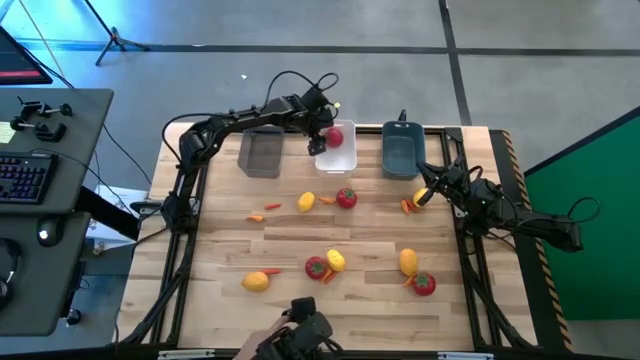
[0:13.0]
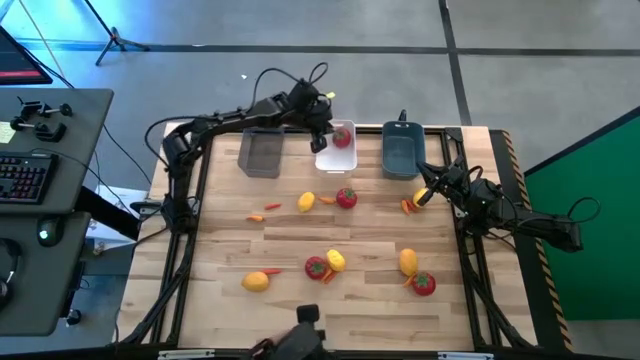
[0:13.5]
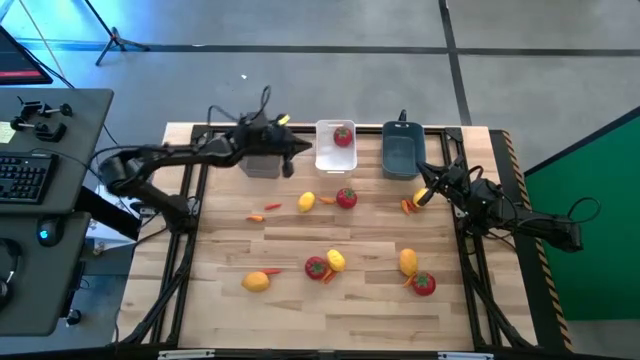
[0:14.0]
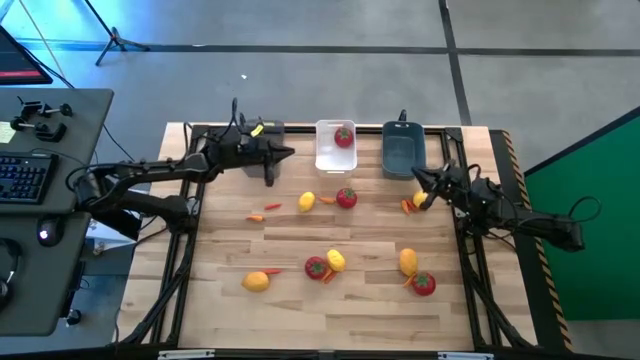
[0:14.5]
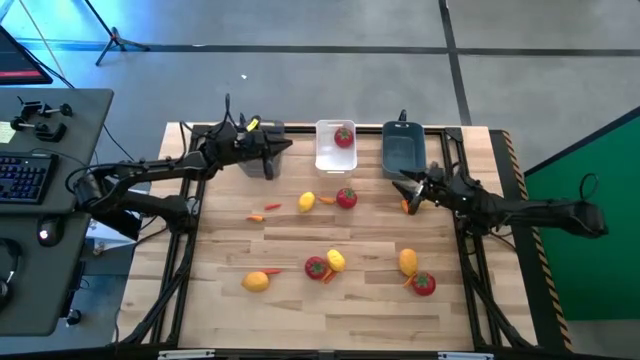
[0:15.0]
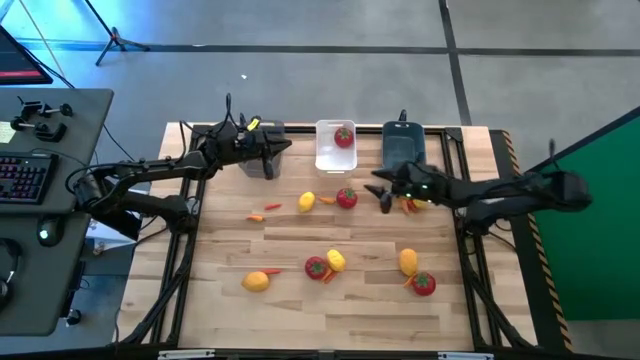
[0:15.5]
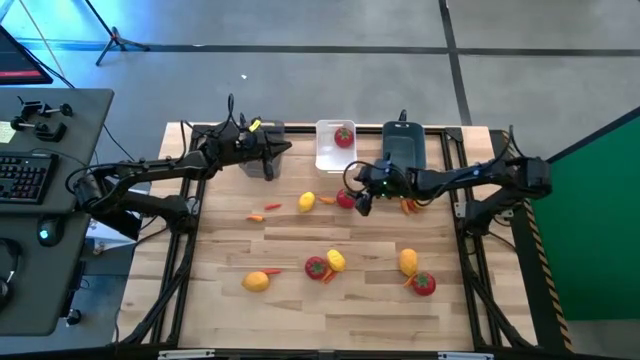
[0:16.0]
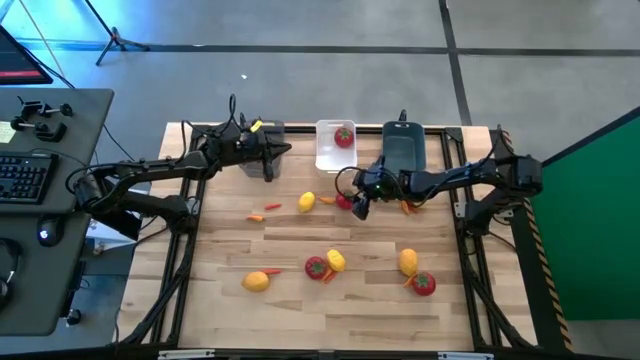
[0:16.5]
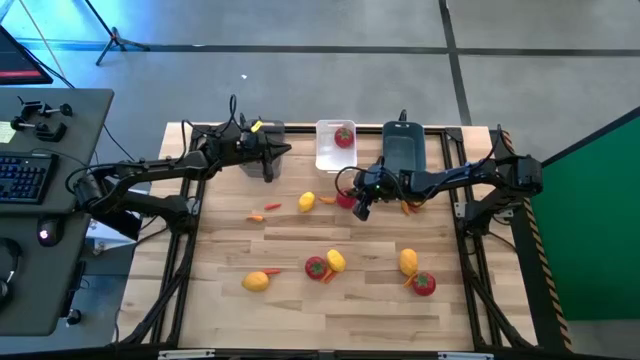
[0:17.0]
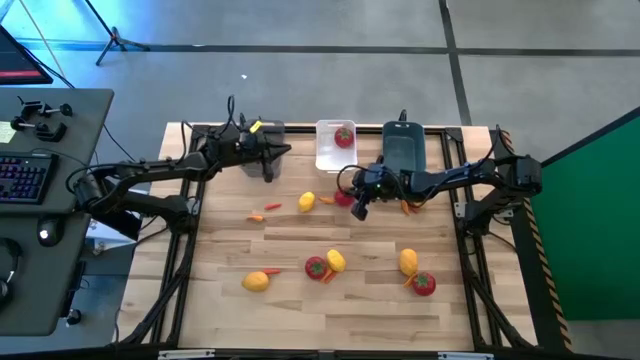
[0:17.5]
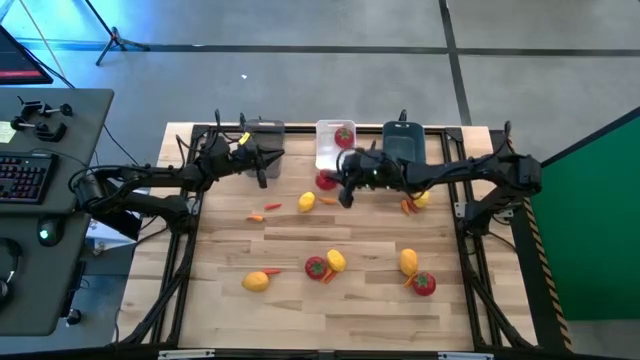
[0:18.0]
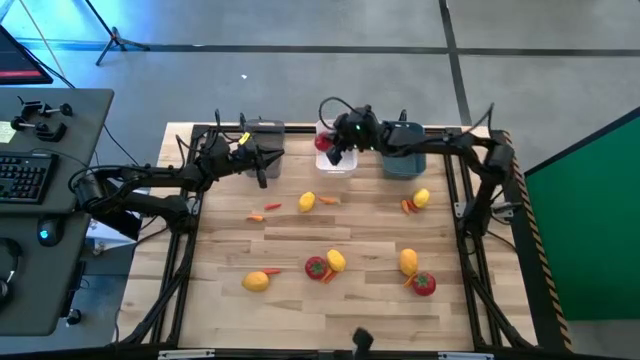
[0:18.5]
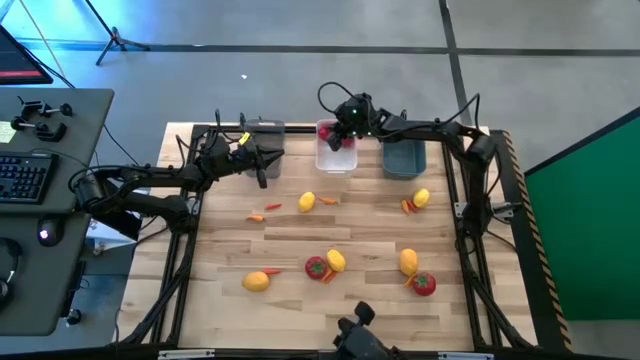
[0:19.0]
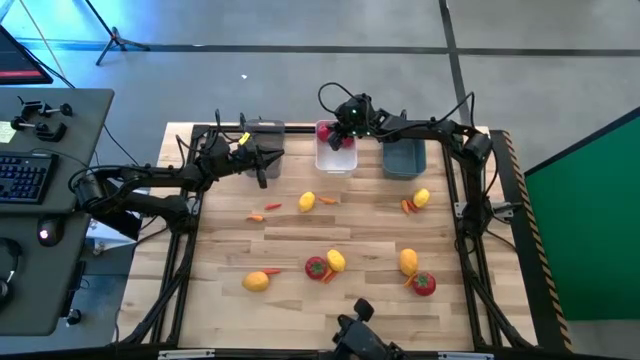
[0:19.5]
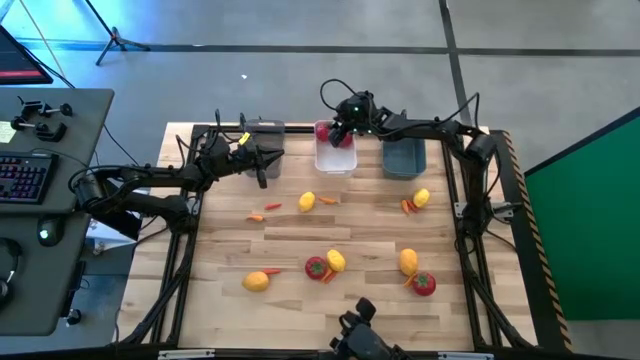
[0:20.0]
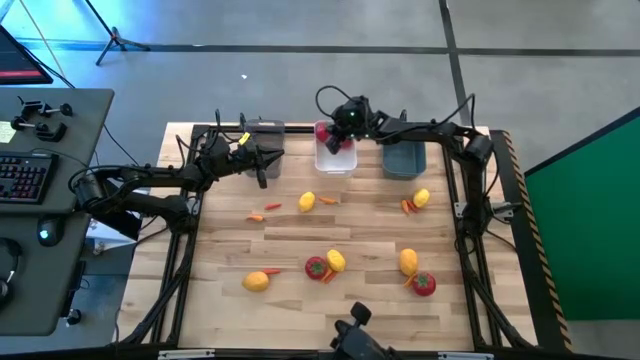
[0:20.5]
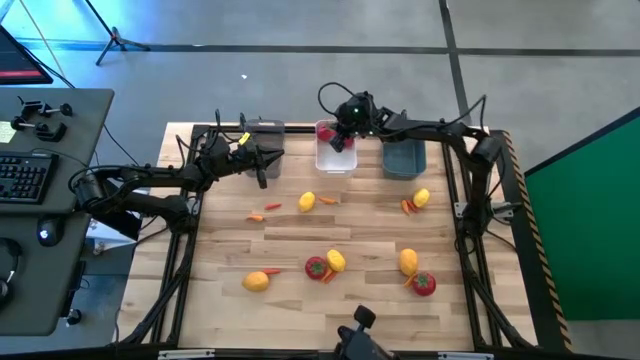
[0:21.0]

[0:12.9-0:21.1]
Task: Sort produce into baskets
Put the red tomato into the white bin

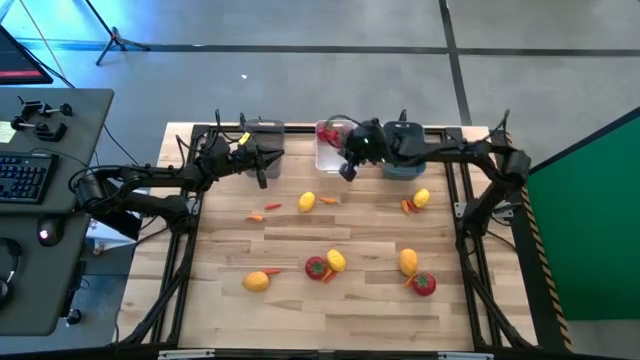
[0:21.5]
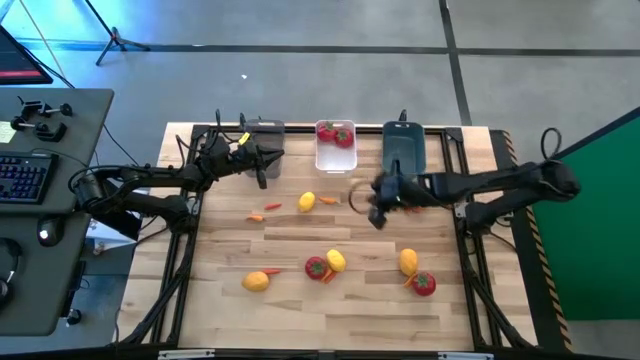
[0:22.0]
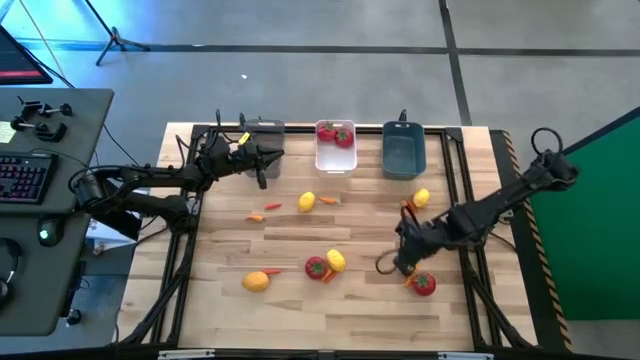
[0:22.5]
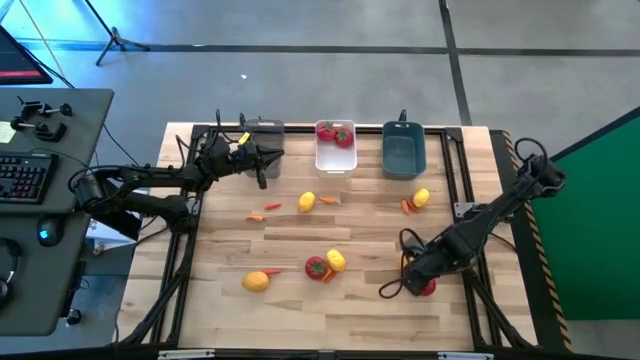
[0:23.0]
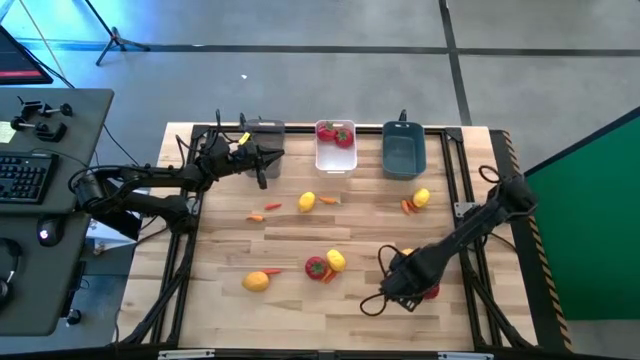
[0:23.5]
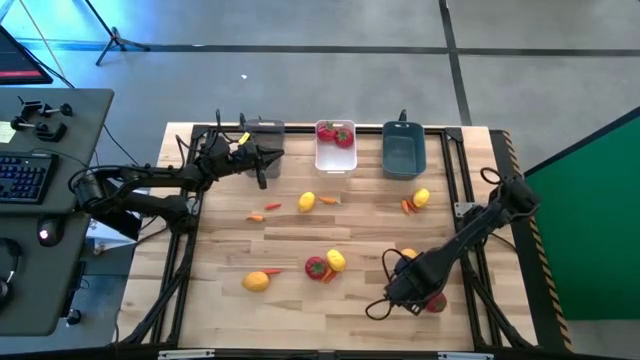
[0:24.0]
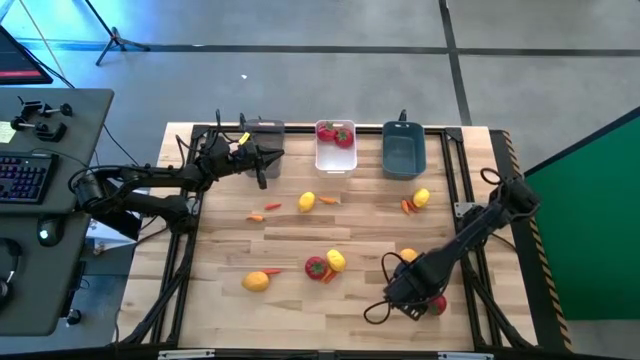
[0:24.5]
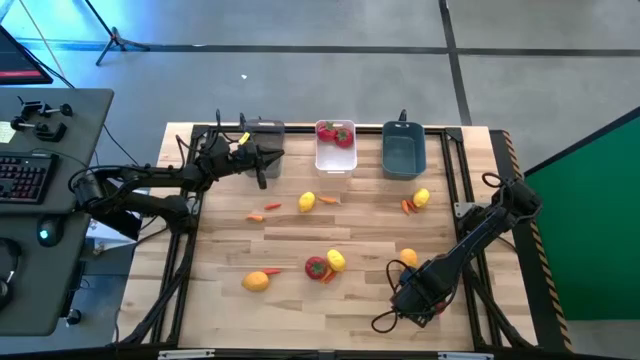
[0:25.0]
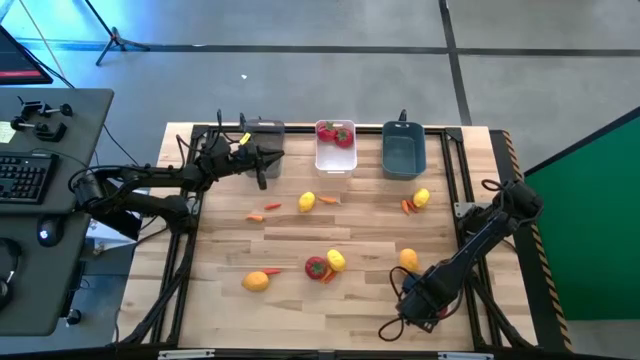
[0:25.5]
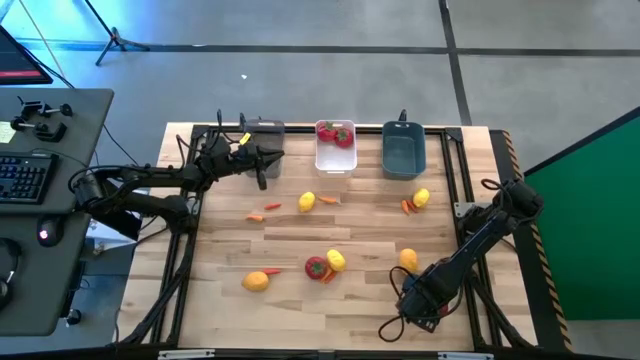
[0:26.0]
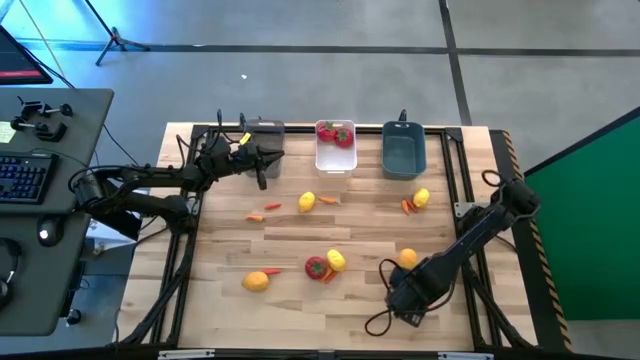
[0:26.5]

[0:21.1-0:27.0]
Put the red tomato into the white bin

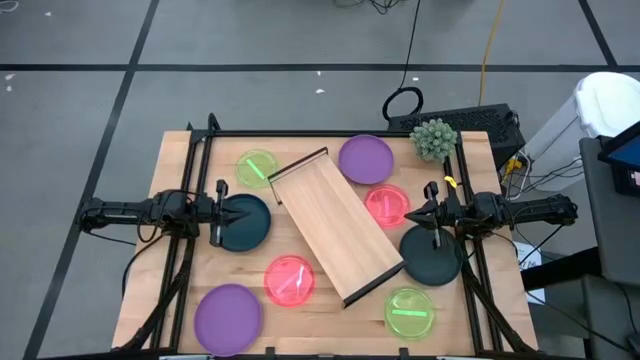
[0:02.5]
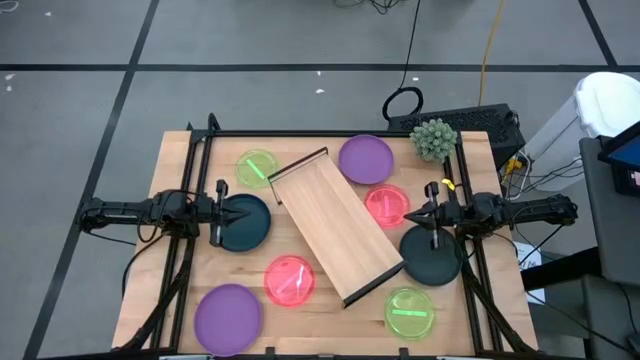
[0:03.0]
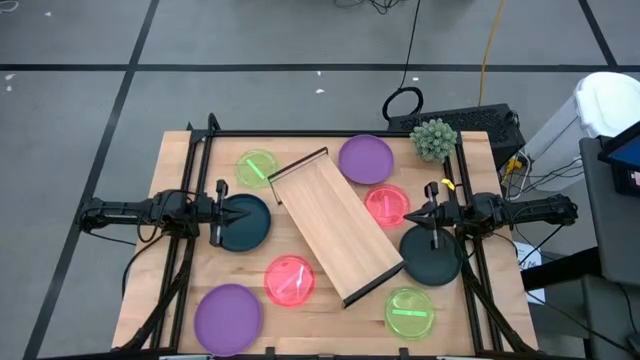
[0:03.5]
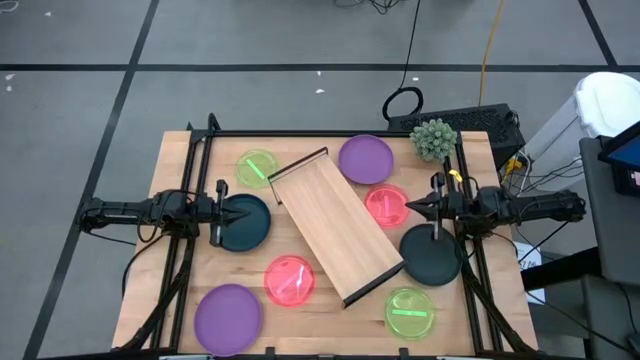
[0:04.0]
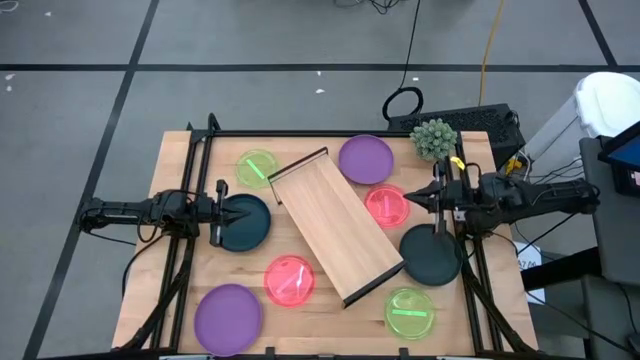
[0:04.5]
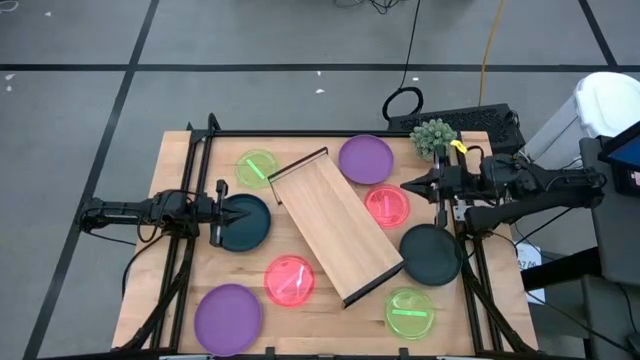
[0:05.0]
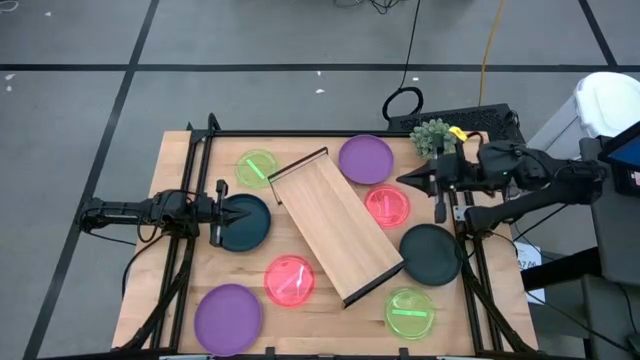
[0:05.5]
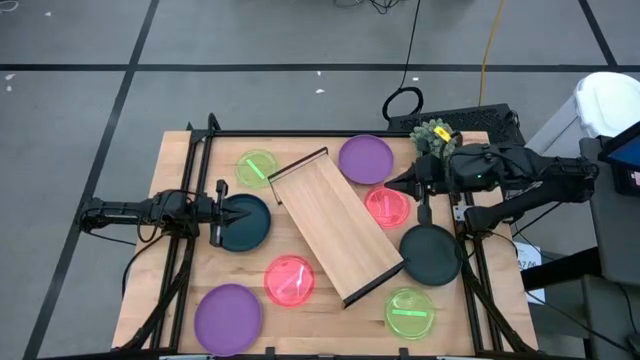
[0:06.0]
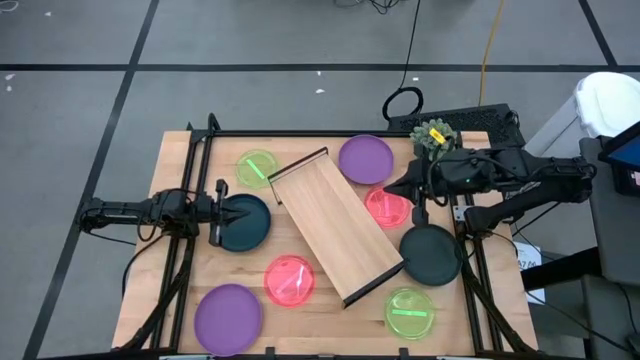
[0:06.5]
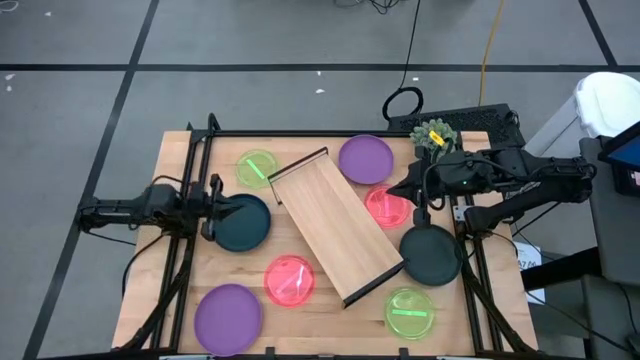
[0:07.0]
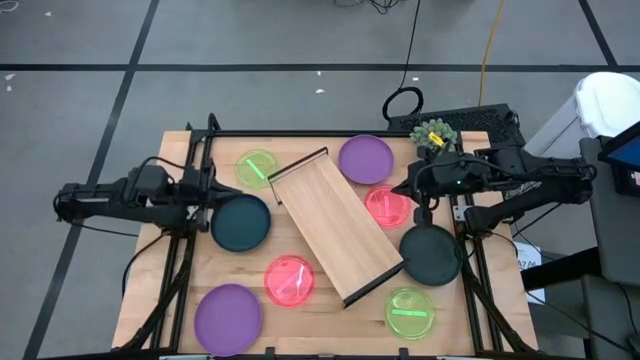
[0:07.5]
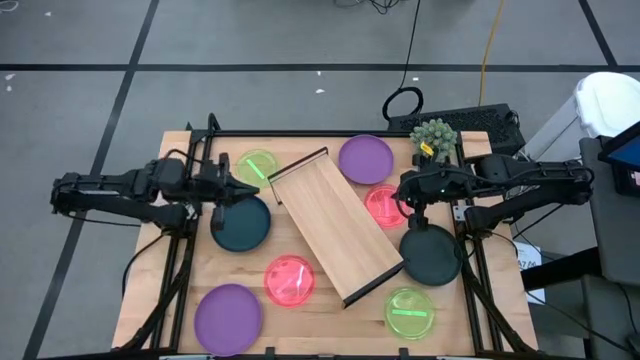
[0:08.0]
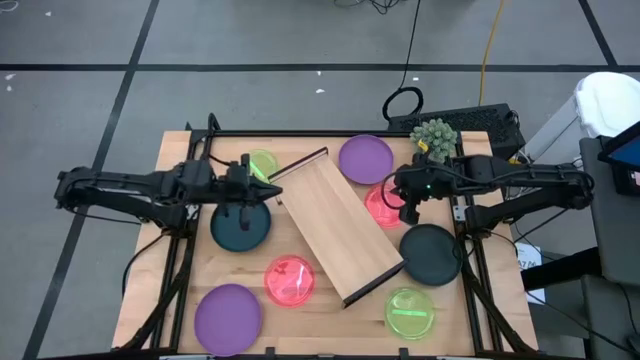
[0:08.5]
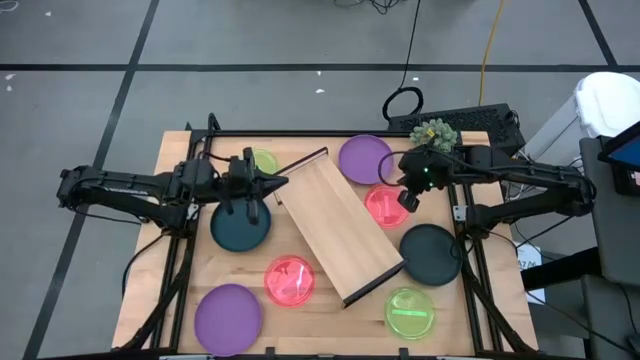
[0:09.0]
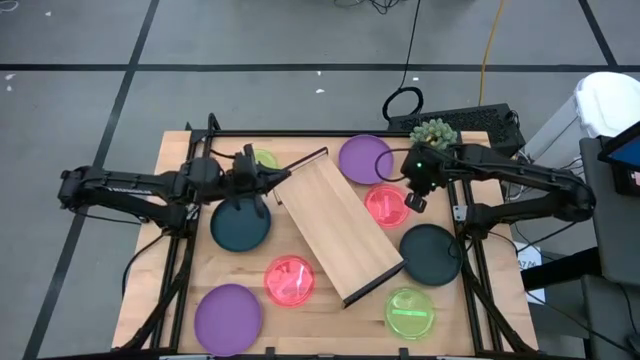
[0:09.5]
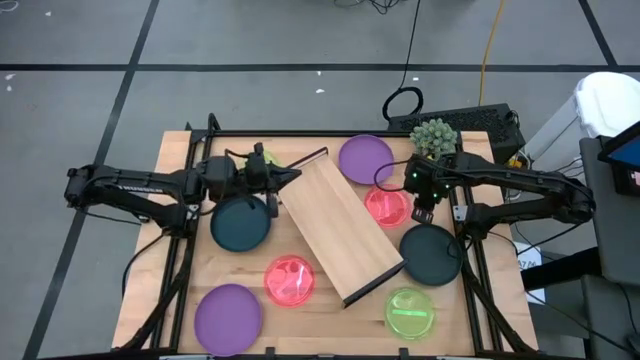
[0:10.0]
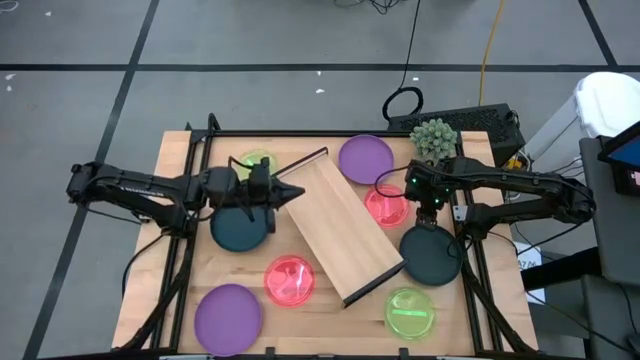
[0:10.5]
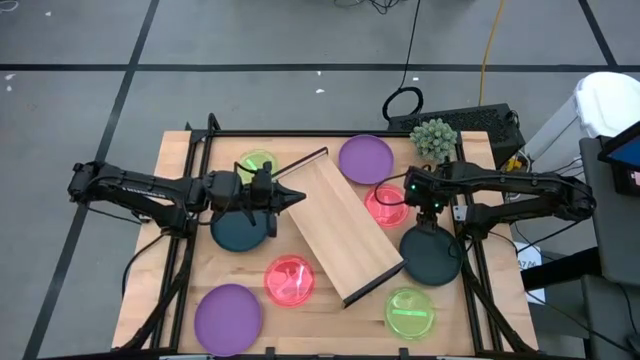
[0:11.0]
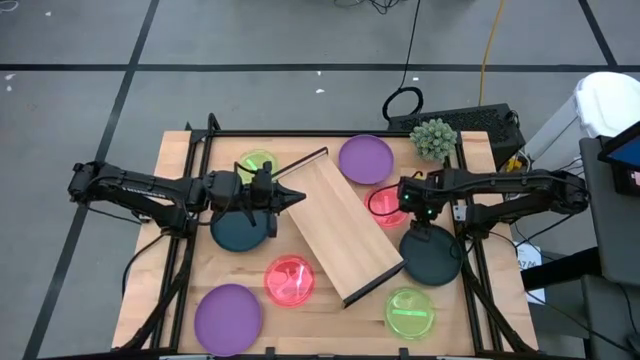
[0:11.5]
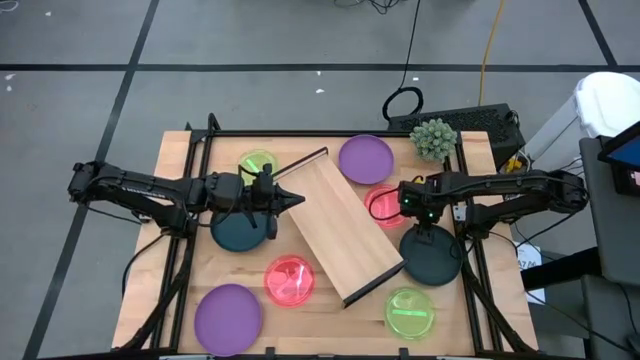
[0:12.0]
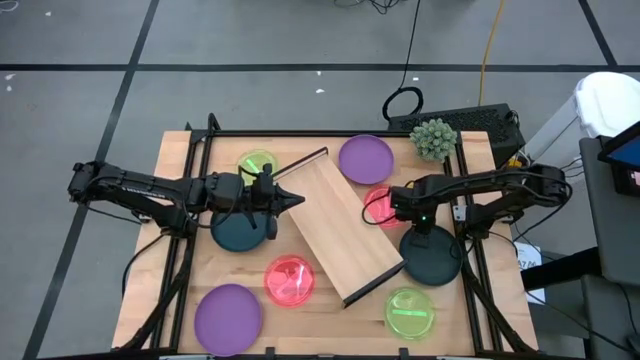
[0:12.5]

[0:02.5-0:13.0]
Task: Place and stack plates onto a shelf
Put the right black plate on the shelf
